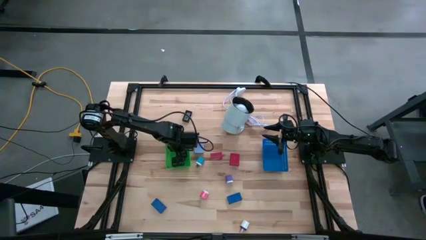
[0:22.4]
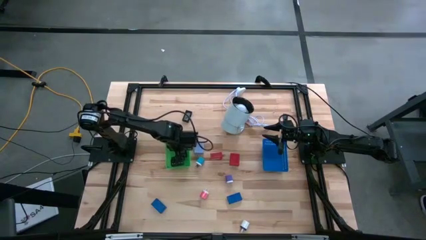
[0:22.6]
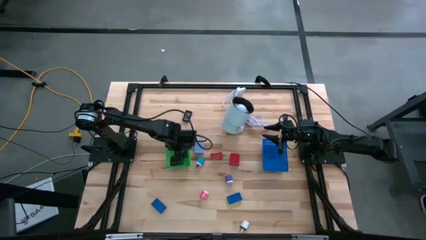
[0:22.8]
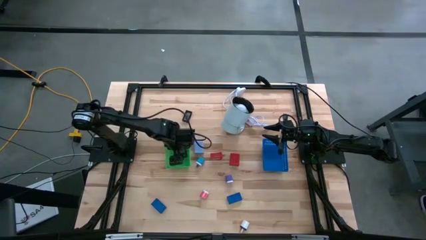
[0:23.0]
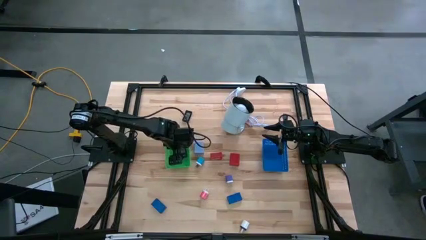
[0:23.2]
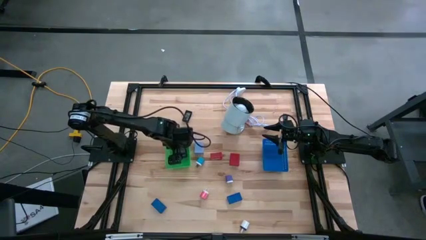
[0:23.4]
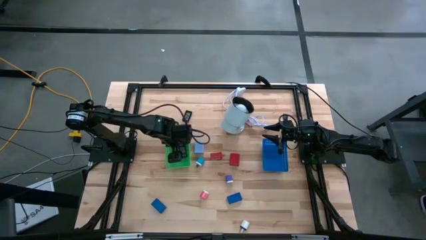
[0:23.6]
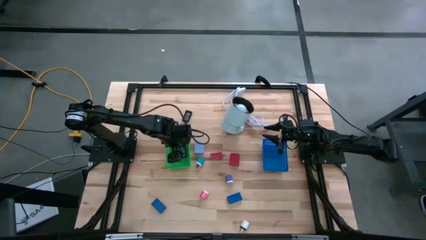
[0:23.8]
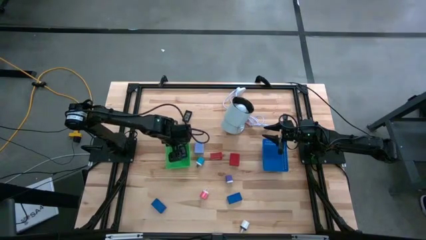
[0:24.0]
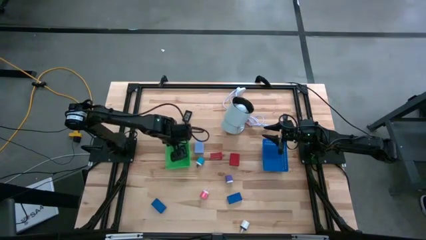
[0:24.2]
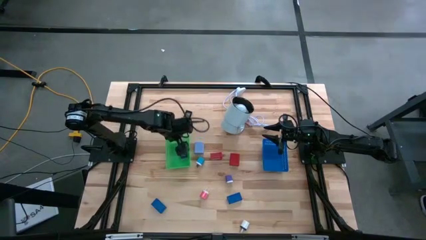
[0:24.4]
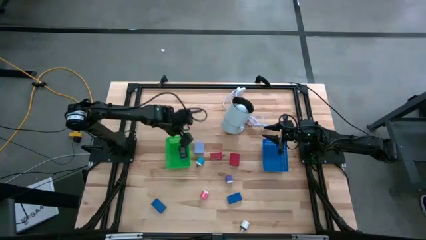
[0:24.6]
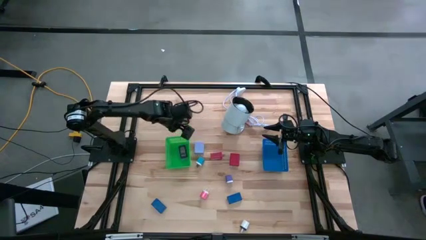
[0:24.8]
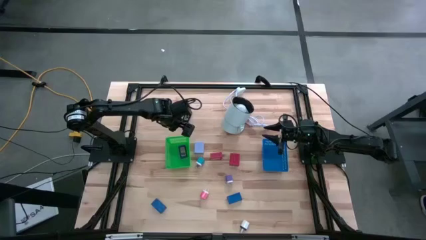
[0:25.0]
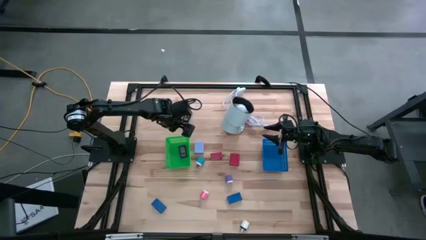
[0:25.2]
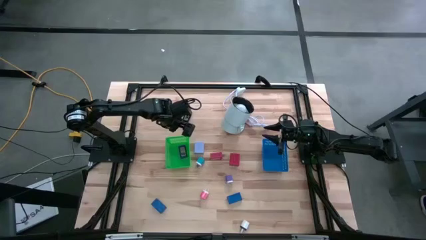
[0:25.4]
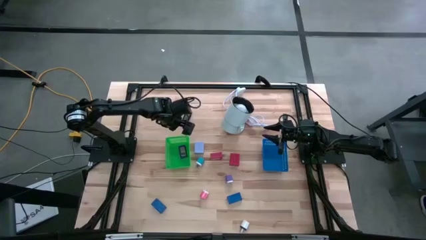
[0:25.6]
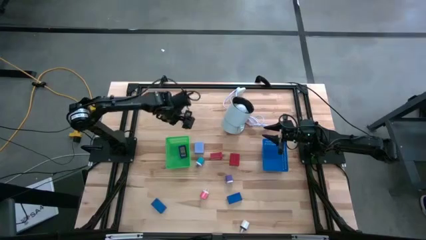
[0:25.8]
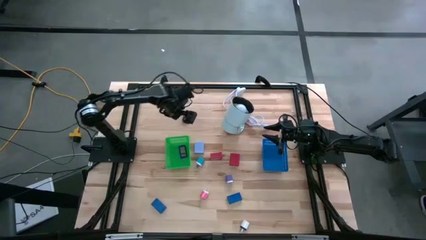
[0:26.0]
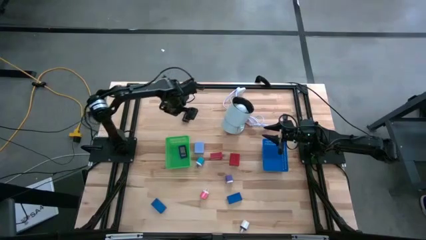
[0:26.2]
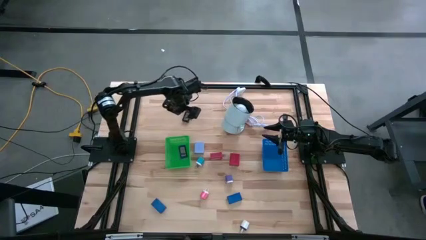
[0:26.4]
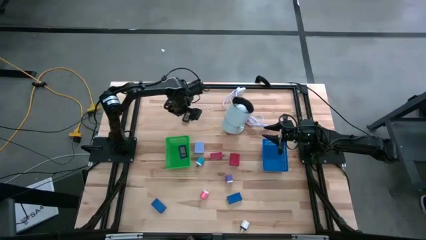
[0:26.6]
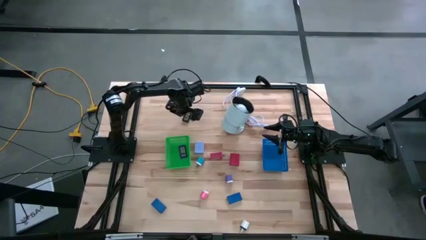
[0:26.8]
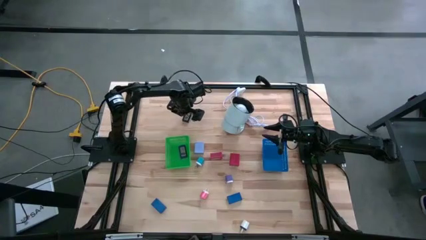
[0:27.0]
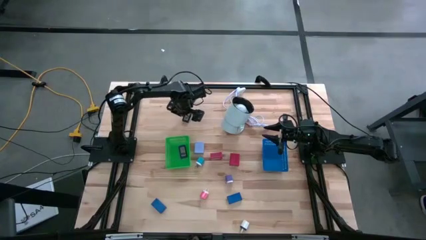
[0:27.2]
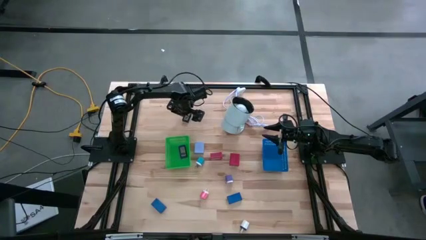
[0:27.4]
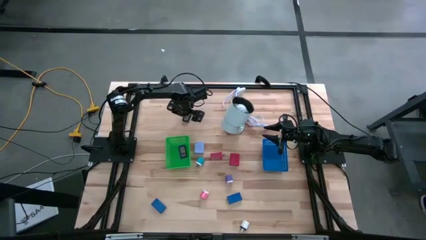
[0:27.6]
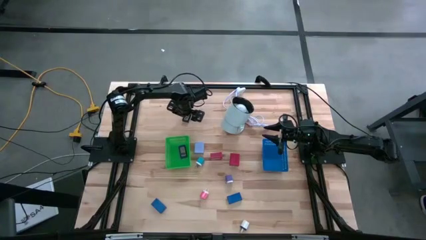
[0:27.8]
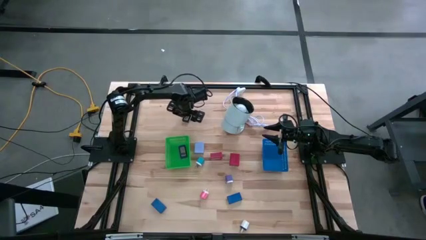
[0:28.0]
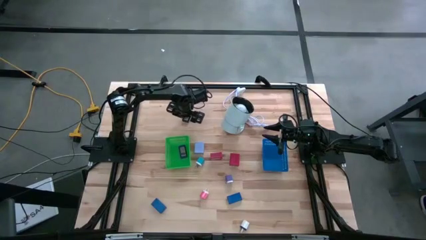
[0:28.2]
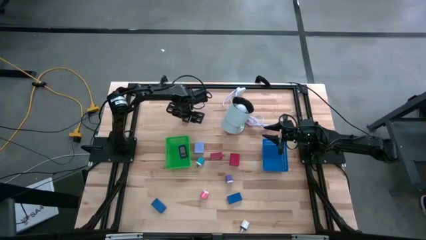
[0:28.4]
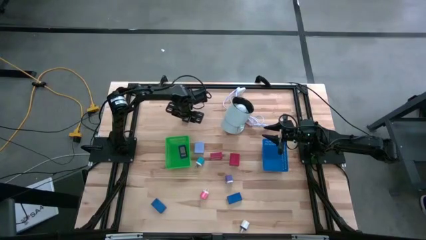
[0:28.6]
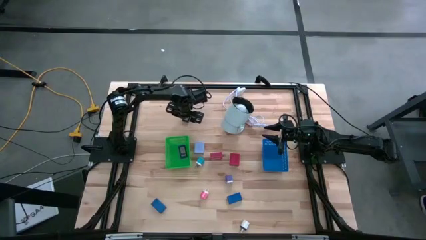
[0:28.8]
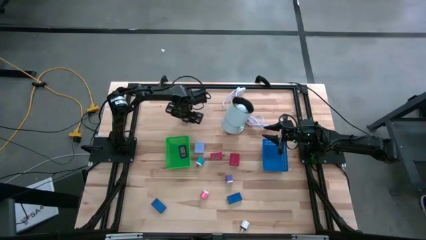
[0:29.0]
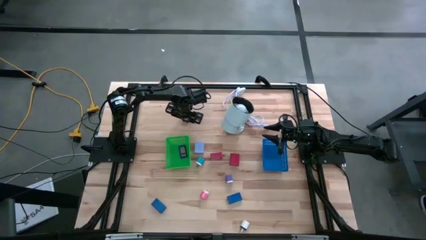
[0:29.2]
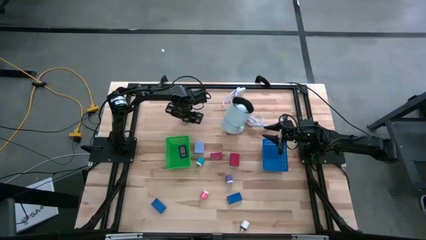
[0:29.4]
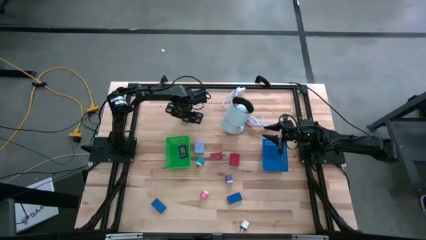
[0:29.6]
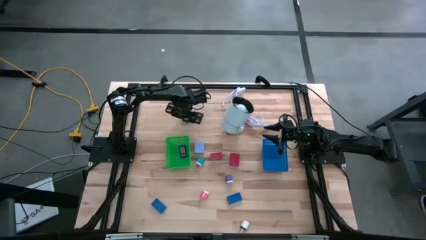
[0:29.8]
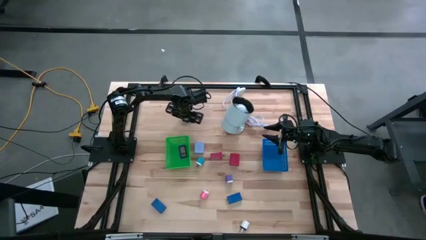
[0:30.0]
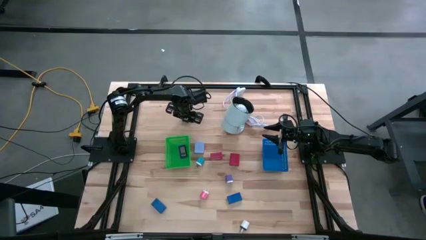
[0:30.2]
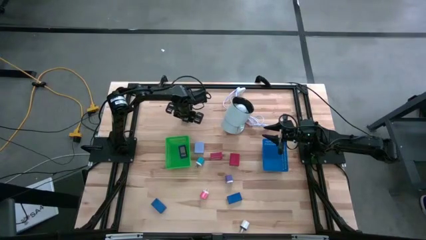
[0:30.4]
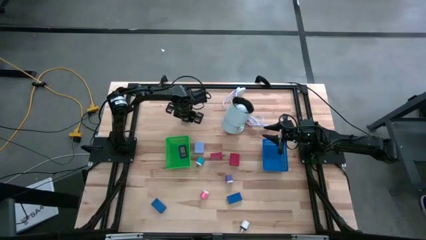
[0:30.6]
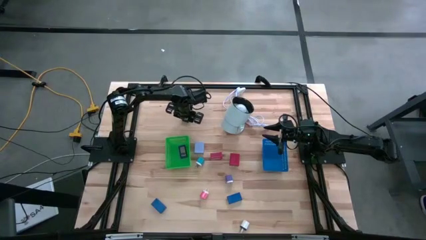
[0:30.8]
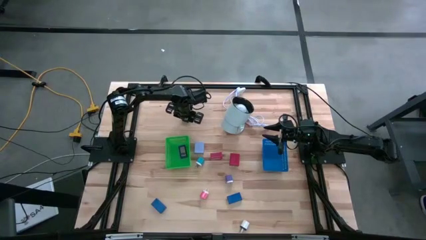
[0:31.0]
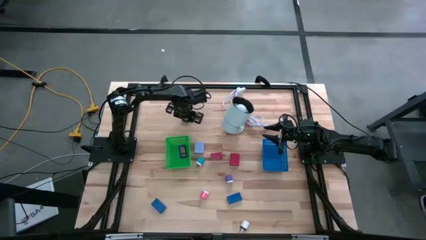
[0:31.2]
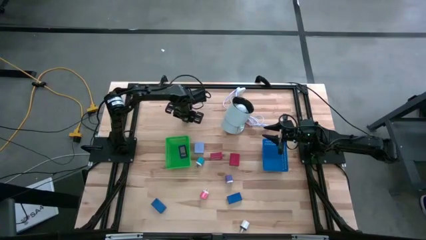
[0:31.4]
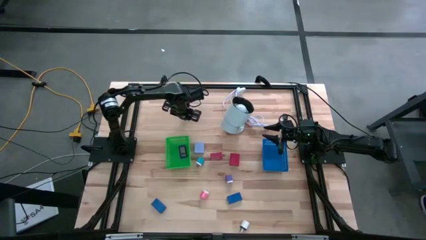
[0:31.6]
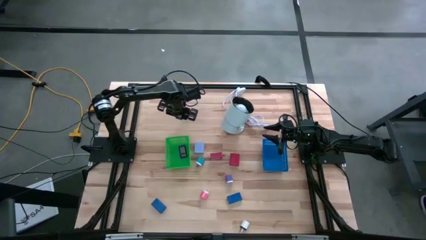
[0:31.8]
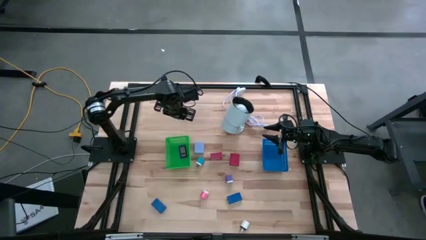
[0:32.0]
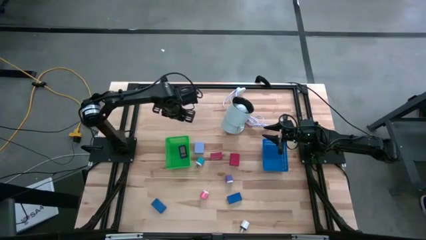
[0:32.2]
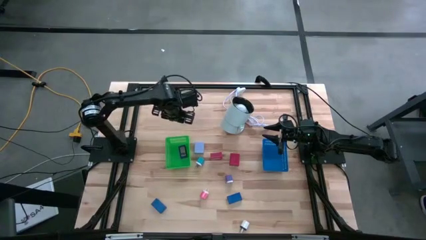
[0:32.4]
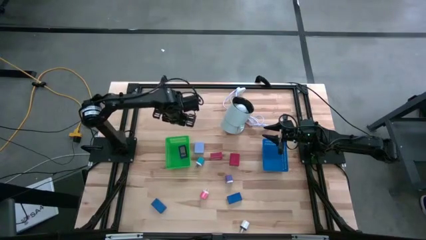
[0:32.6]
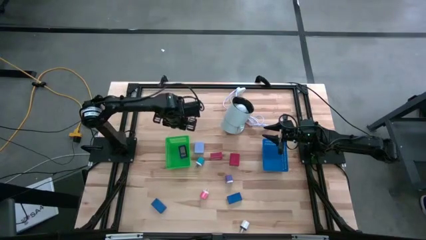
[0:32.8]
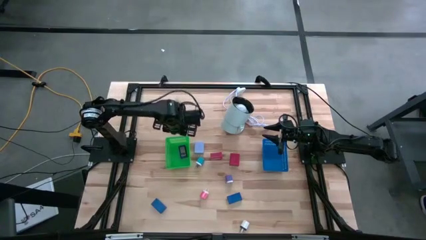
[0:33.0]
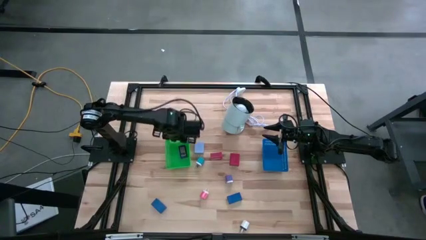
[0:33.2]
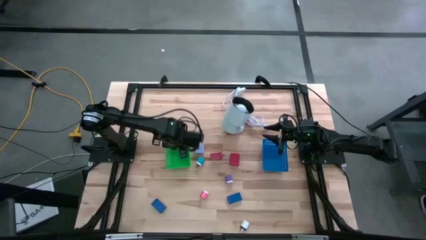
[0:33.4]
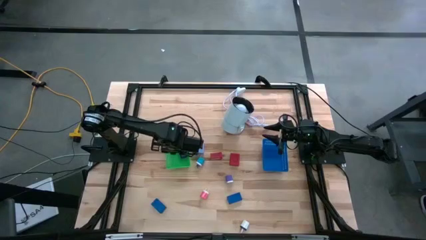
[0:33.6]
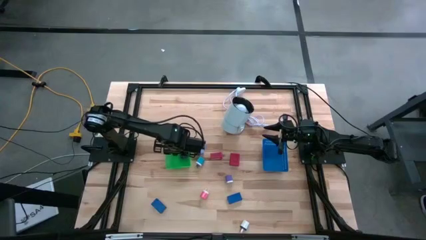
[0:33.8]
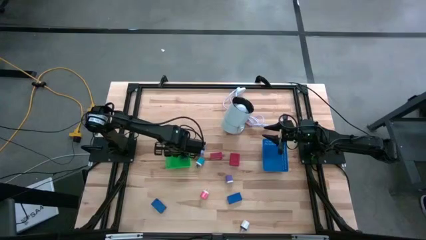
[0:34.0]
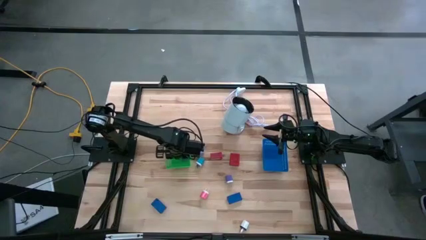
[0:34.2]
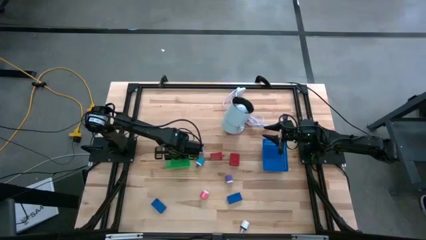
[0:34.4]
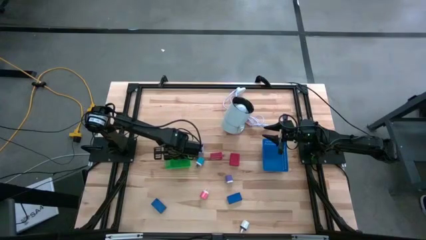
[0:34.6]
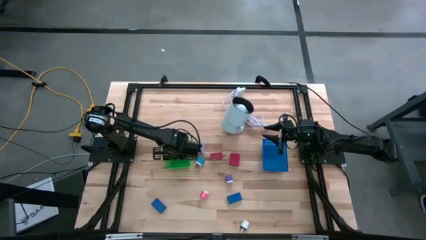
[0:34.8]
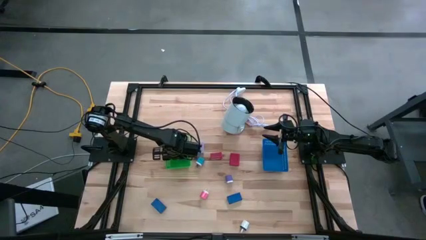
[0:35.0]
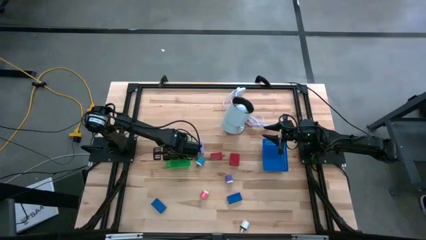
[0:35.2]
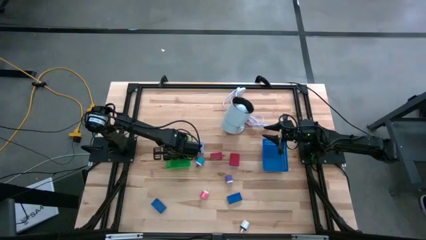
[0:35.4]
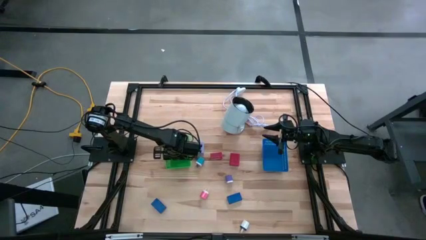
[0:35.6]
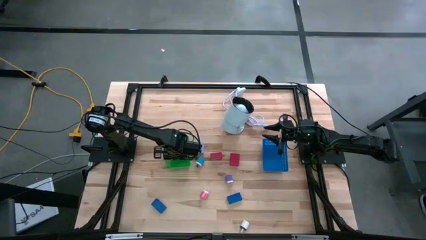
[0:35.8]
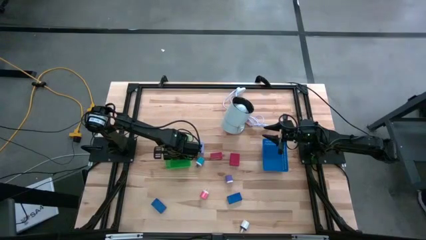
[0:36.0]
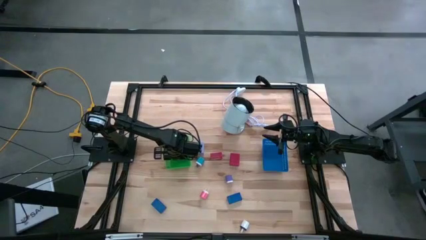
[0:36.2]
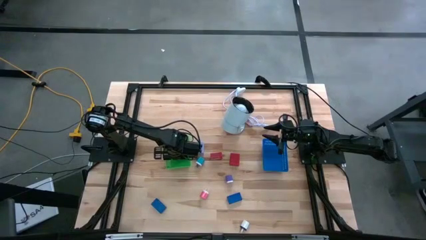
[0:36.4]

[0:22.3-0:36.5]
Task: Pick & Place Office items
Put the black digital timer into the green bin
